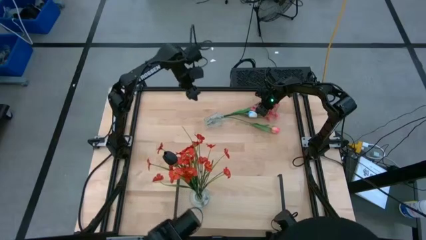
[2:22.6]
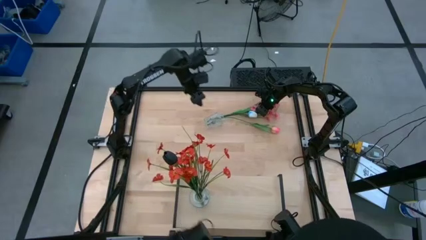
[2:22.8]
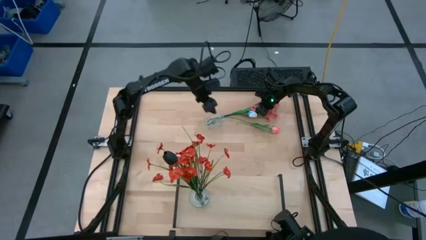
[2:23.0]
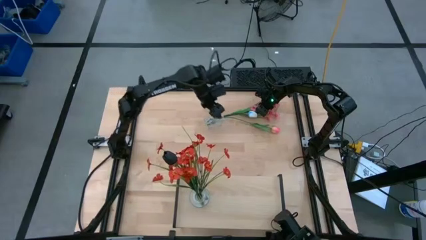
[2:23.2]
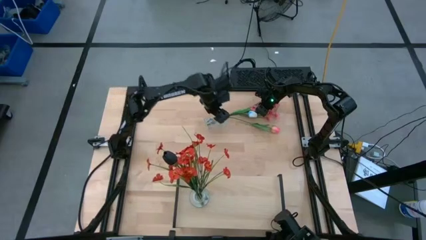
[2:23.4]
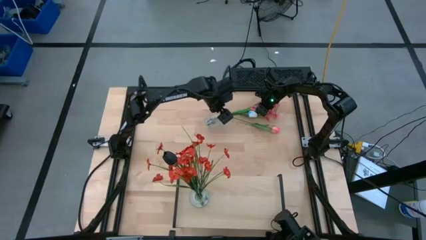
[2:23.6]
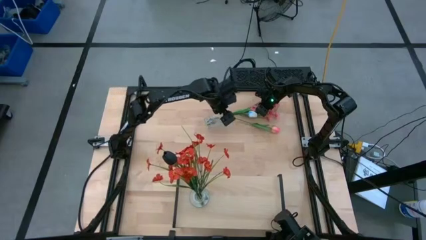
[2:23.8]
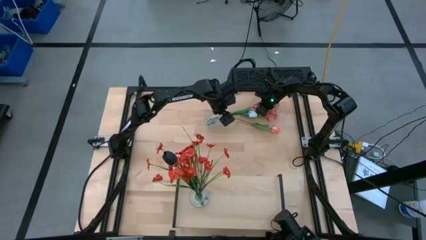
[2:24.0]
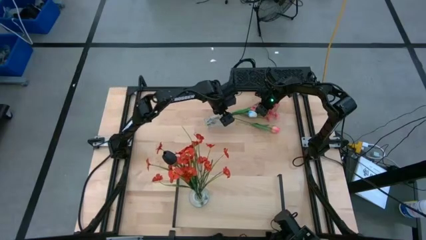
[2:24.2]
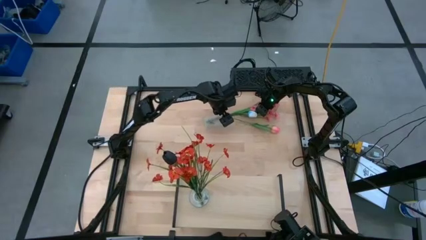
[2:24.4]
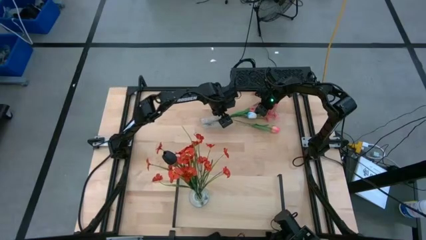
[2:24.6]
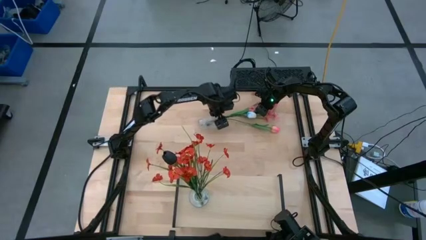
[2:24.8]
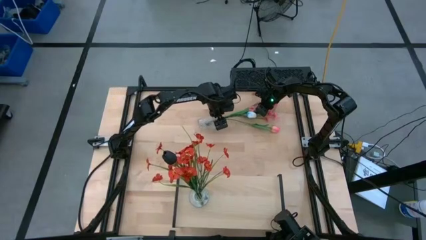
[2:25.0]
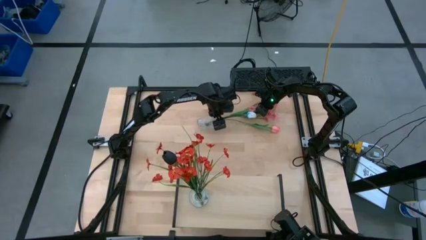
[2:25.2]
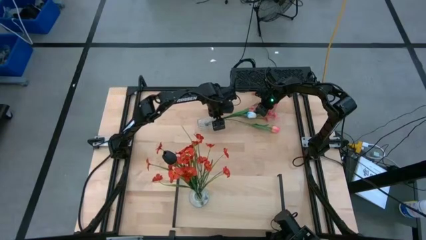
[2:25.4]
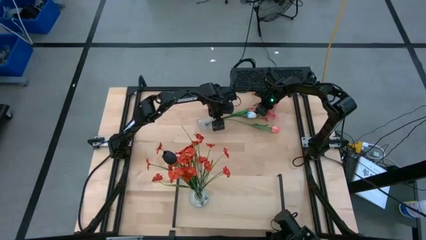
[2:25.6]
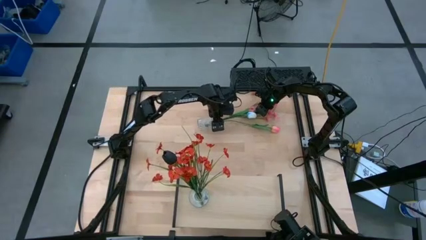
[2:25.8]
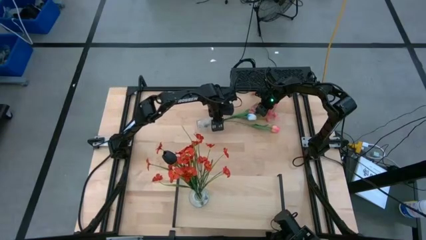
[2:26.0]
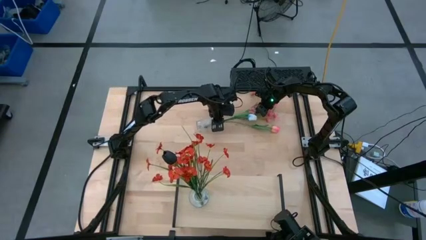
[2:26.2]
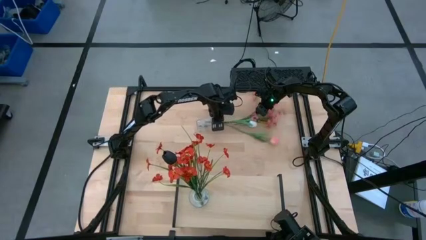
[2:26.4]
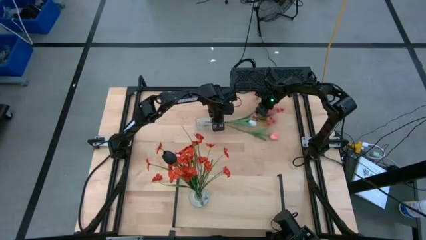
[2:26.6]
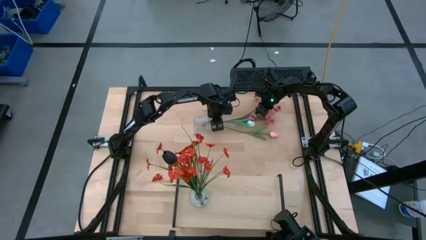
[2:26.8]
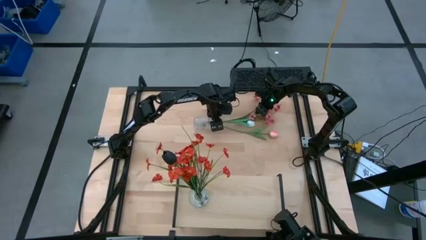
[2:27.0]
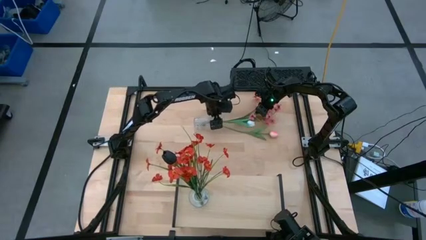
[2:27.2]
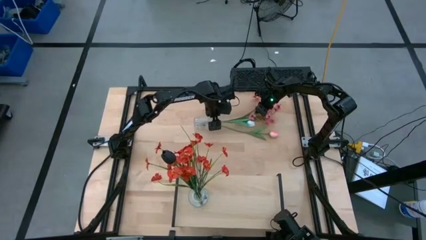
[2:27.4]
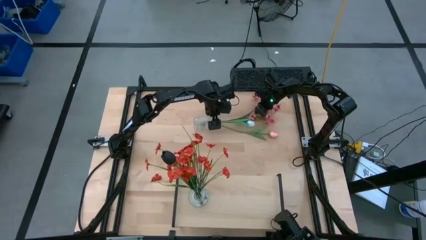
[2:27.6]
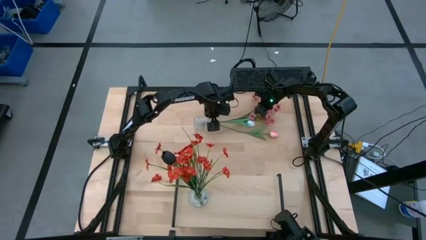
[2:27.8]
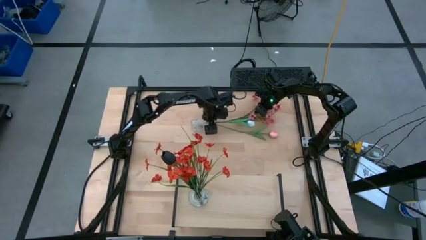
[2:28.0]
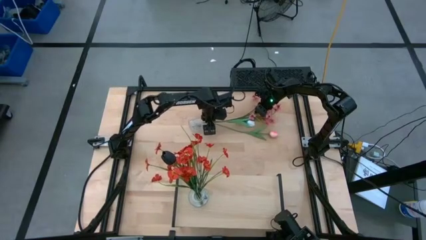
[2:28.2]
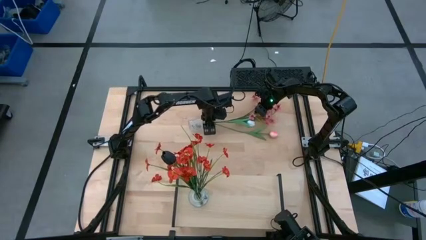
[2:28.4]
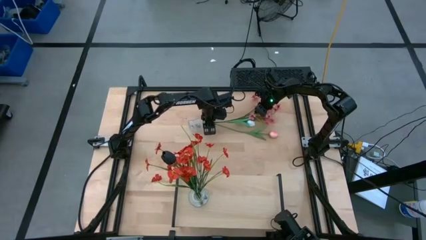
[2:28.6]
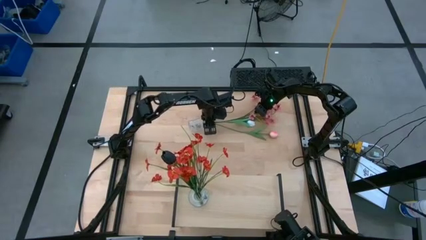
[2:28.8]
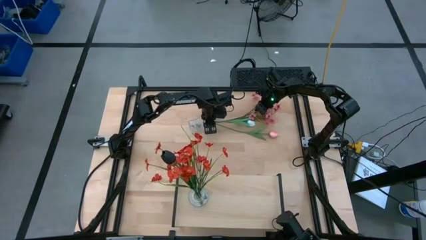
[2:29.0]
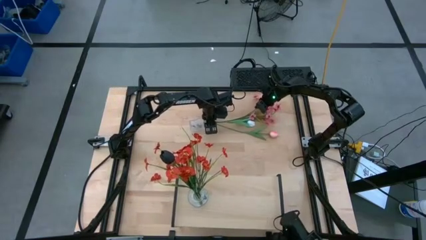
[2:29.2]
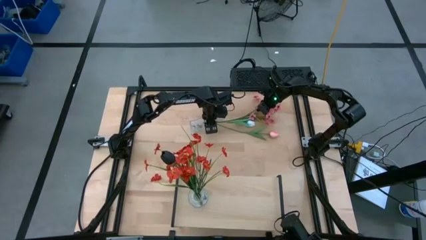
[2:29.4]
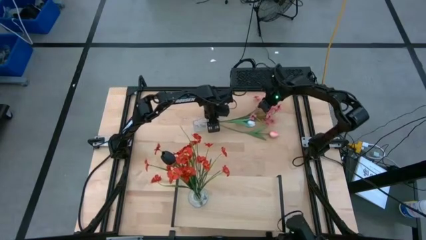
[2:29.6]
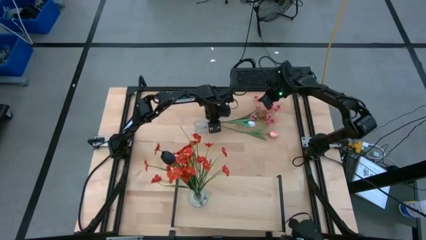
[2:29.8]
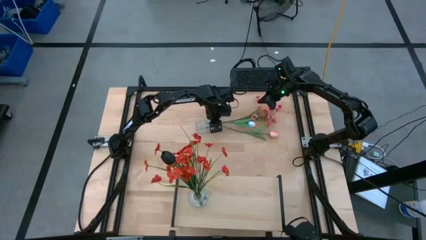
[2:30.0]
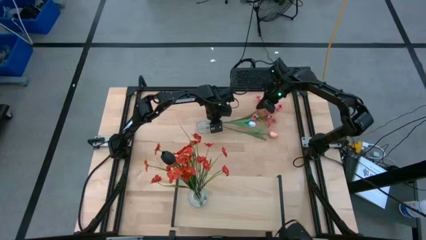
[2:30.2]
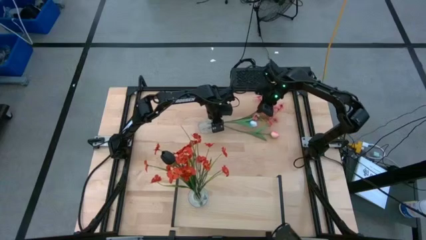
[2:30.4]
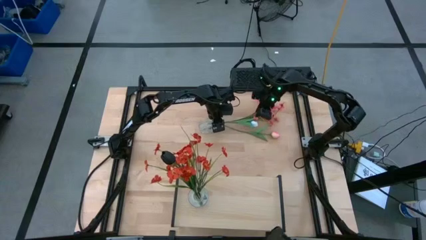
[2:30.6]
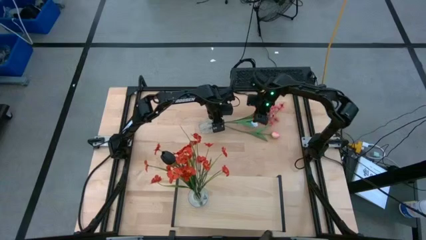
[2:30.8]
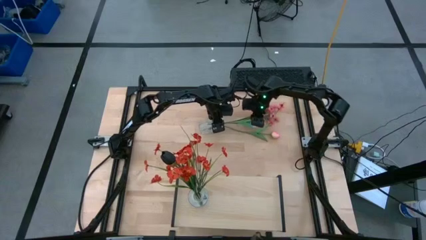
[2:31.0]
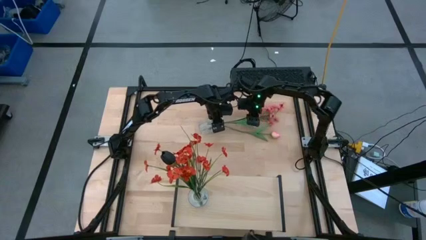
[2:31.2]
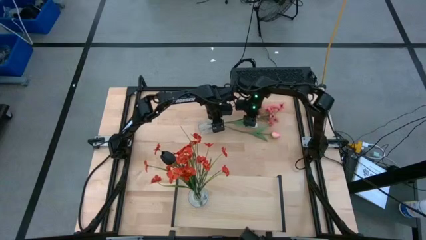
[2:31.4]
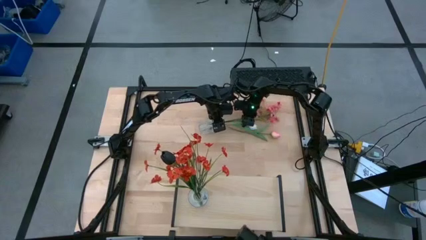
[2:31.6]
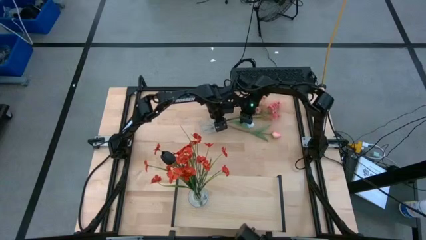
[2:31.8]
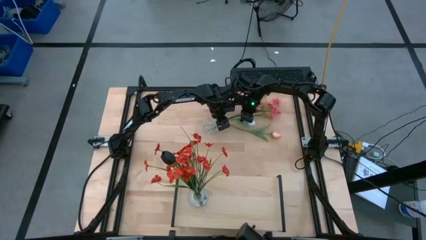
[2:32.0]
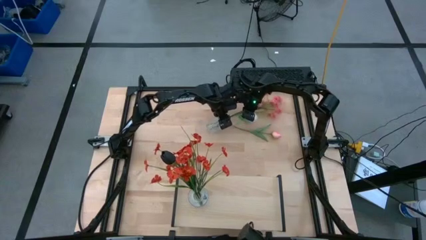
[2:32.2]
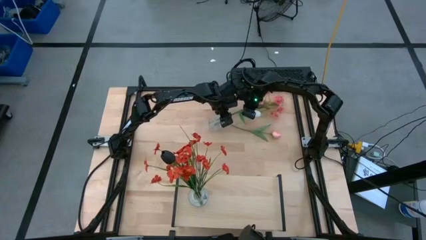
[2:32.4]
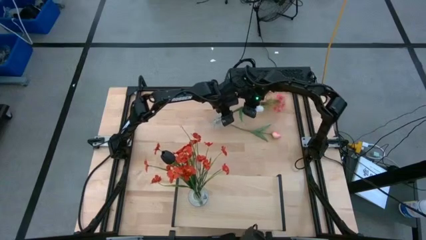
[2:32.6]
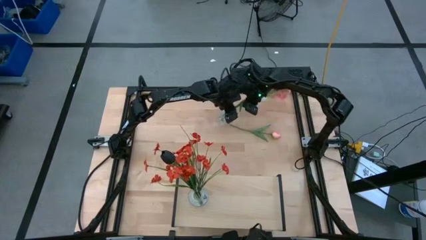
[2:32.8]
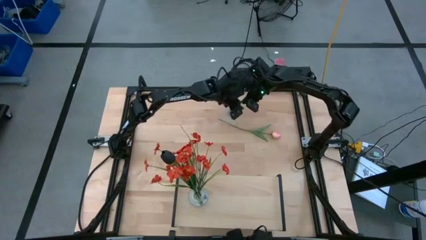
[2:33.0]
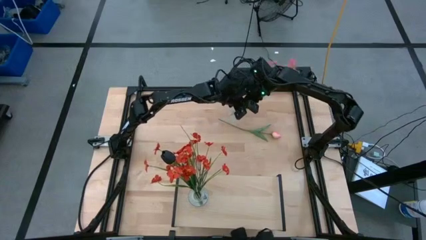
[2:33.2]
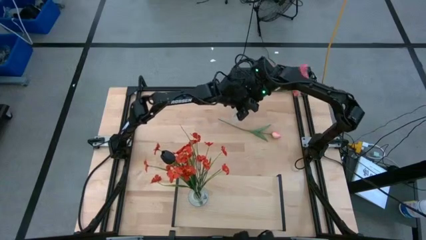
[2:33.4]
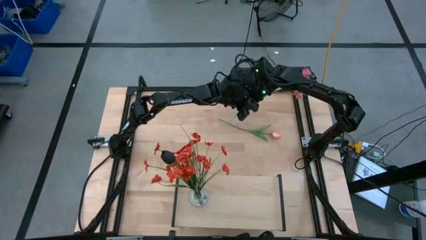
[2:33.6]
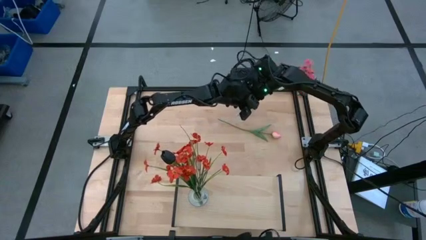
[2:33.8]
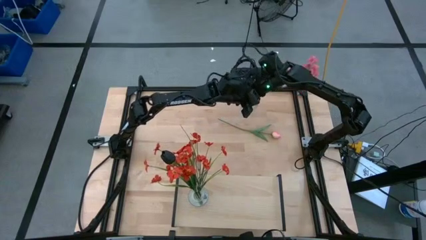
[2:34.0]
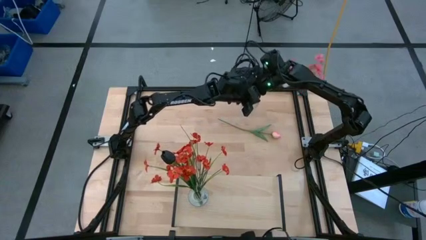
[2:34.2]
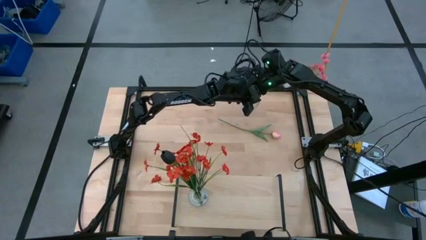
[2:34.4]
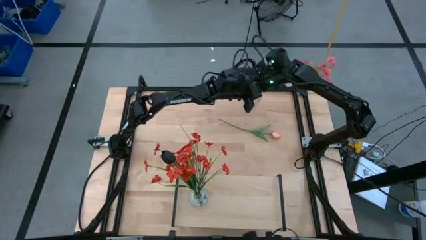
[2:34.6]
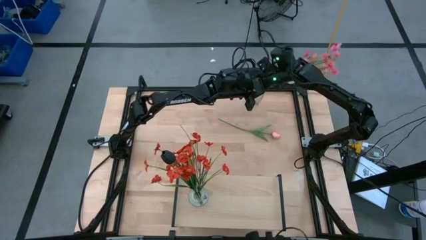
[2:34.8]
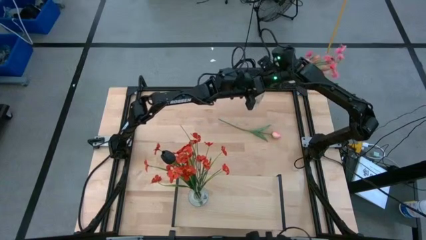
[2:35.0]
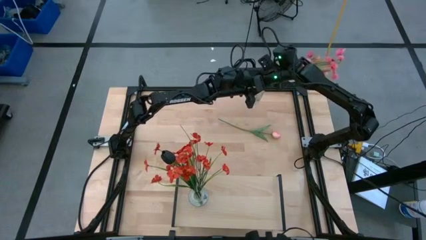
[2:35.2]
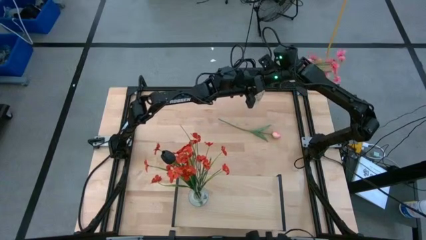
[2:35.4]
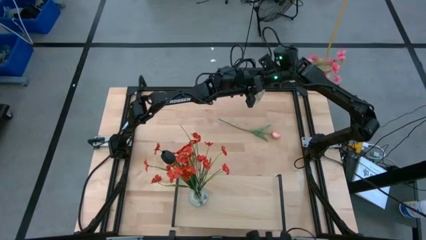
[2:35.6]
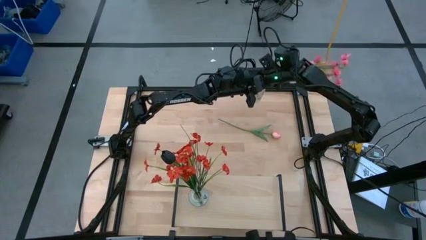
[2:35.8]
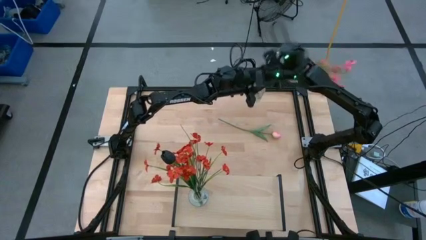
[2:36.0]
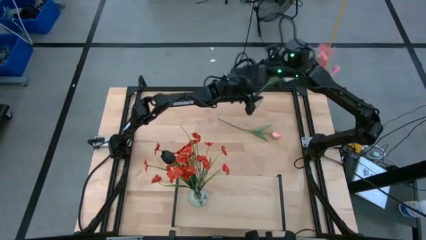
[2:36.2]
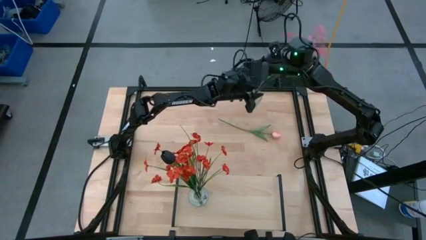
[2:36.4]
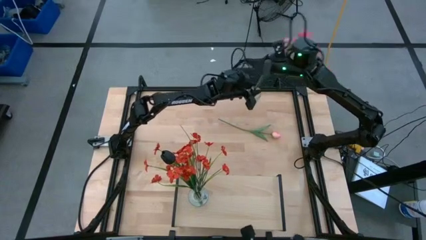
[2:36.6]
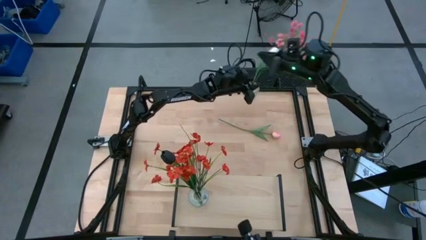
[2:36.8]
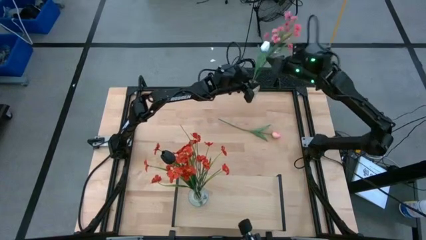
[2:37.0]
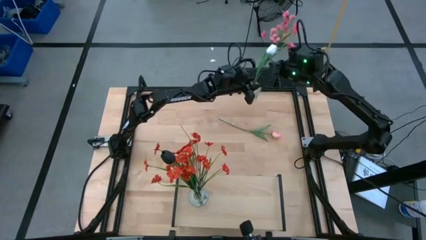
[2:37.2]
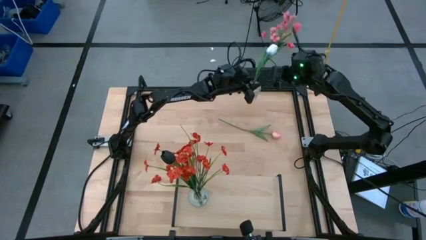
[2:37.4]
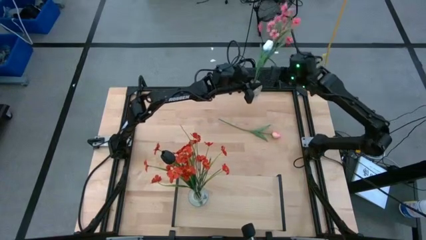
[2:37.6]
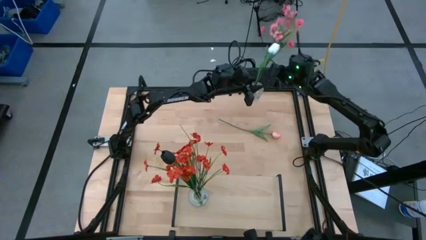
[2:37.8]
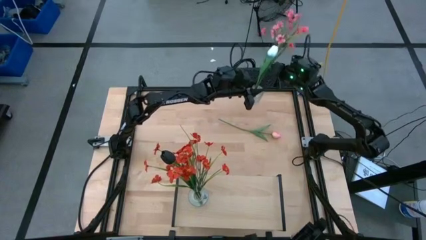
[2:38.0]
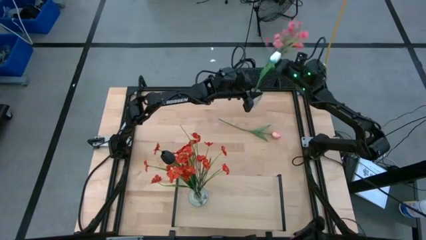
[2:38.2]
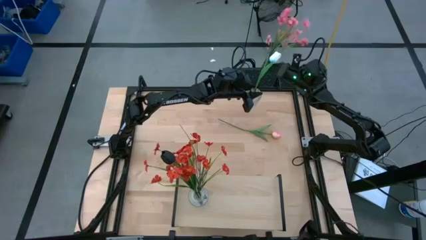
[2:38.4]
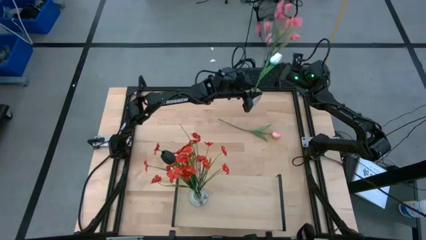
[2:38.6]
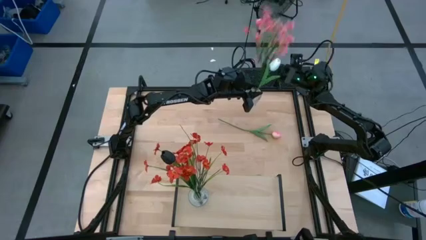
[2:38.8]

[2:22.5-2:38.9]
Task: Pick and place flowers into a vace then onto a shelf
Put the pink tulip into the transparent vase
